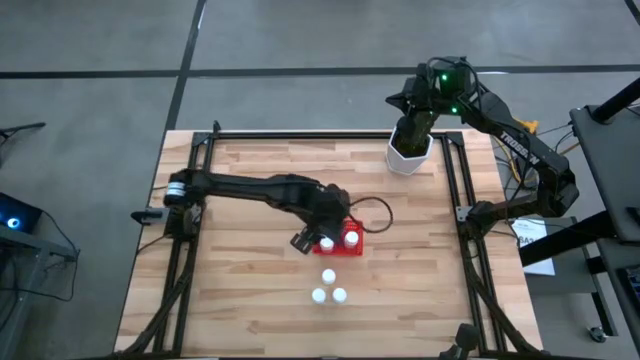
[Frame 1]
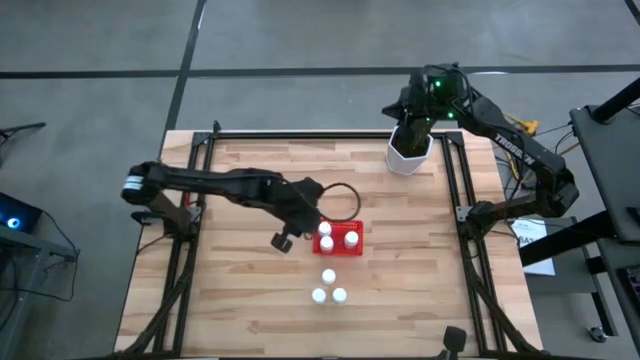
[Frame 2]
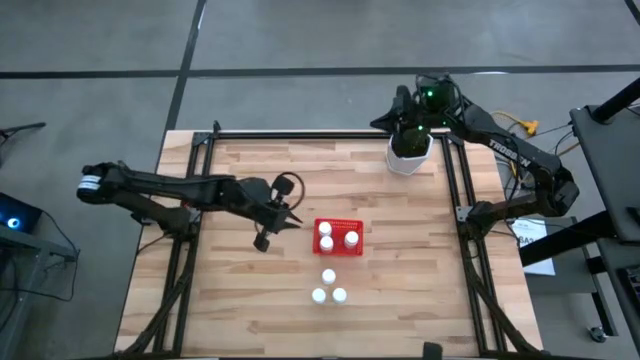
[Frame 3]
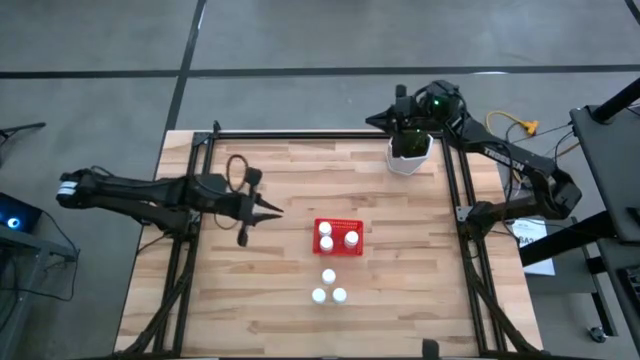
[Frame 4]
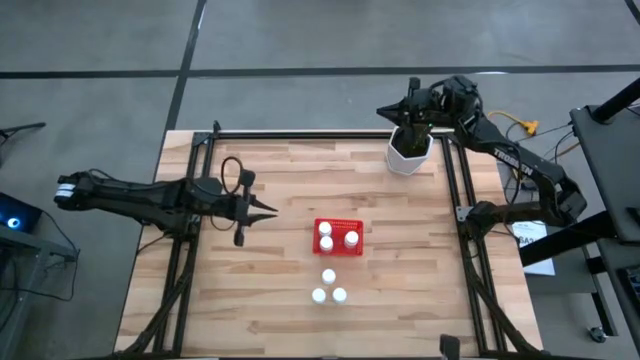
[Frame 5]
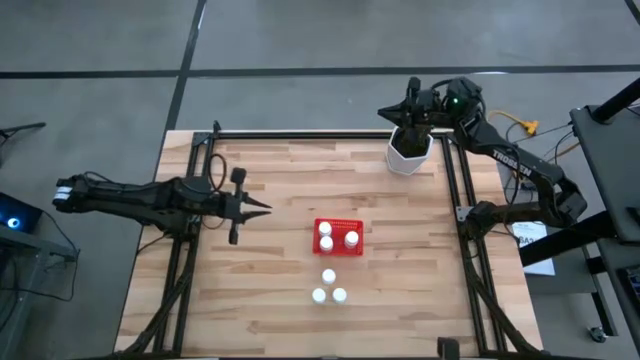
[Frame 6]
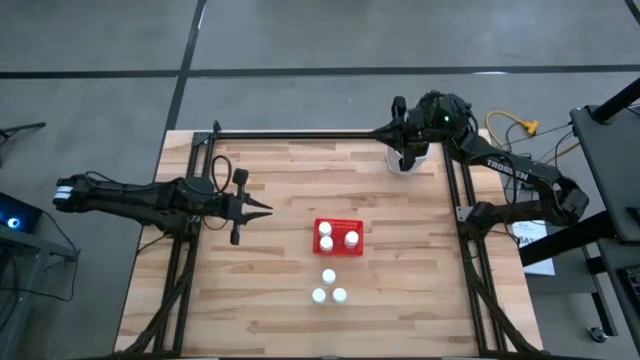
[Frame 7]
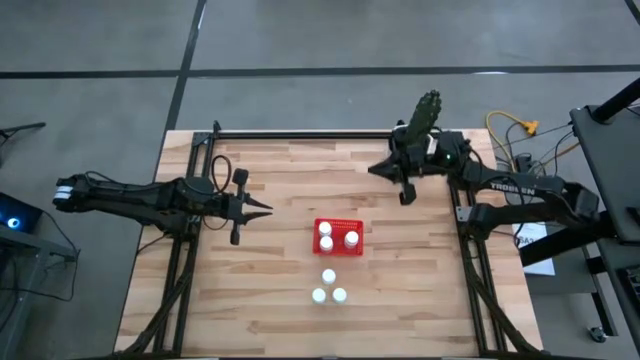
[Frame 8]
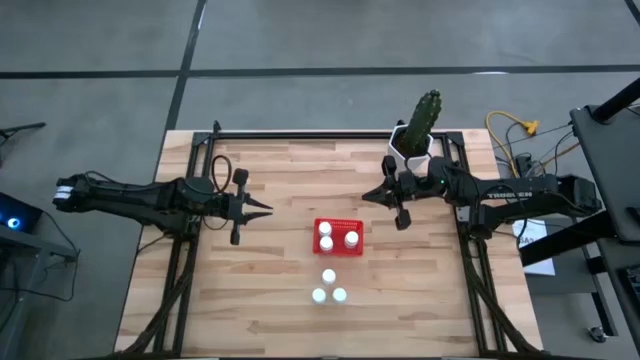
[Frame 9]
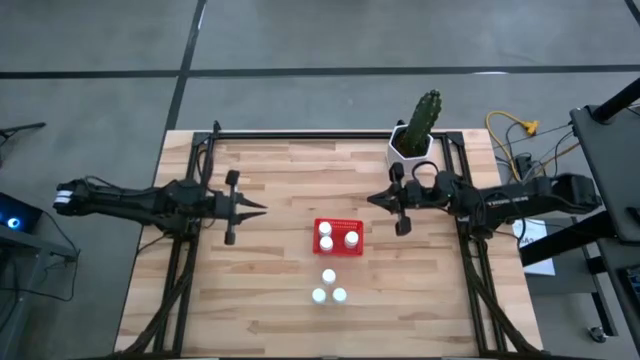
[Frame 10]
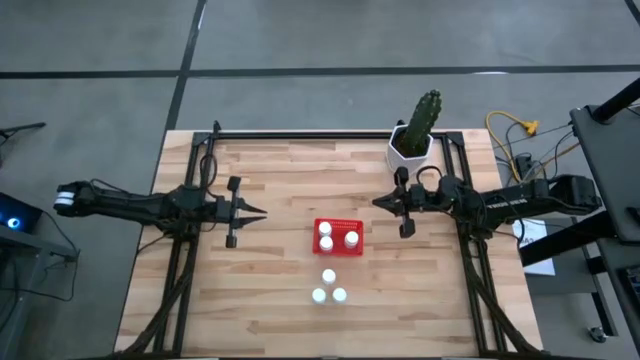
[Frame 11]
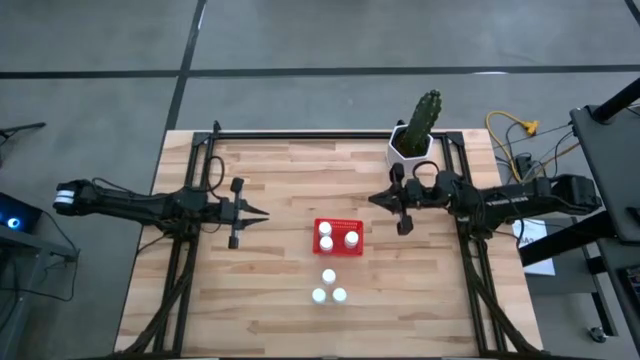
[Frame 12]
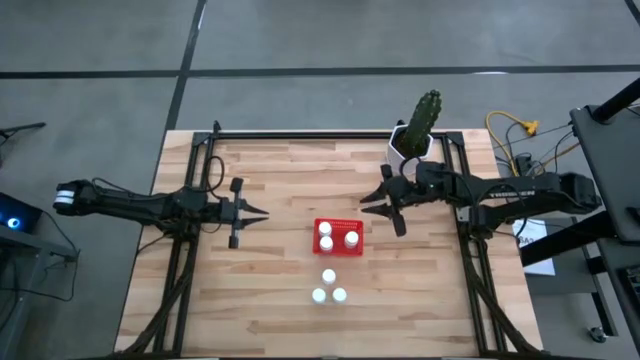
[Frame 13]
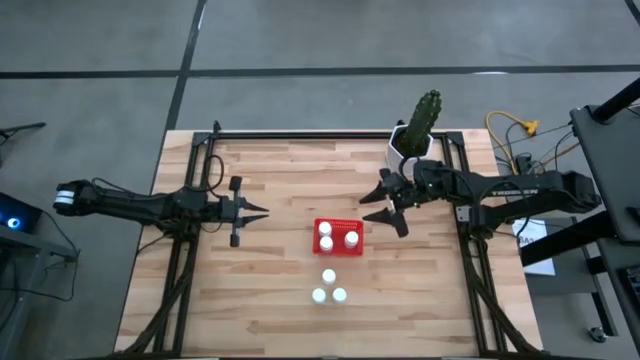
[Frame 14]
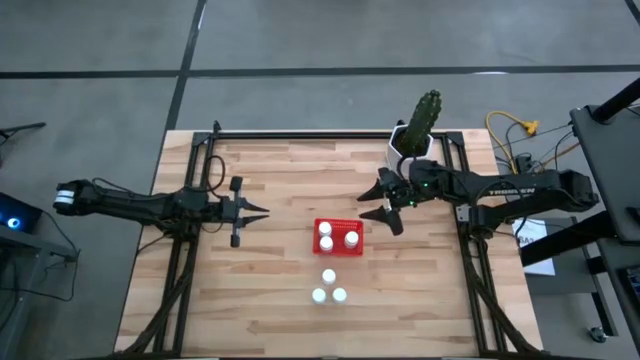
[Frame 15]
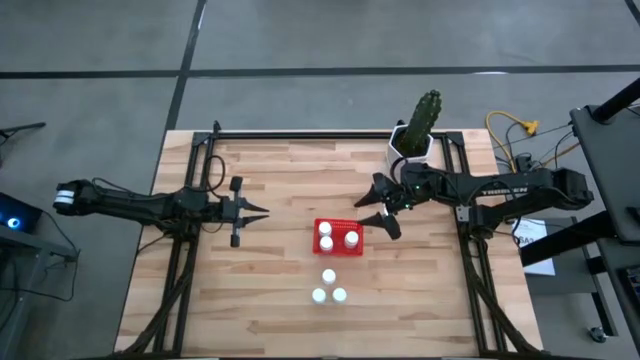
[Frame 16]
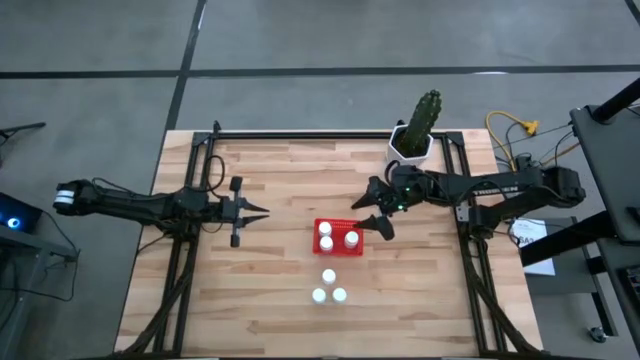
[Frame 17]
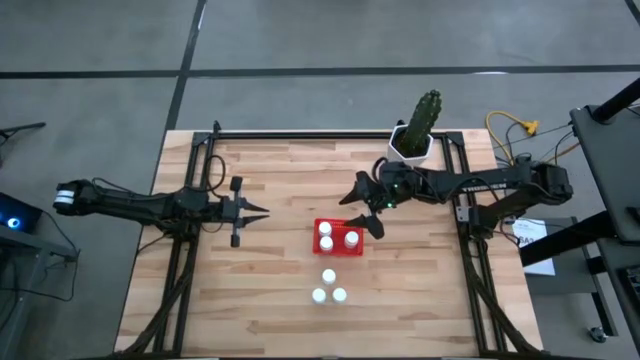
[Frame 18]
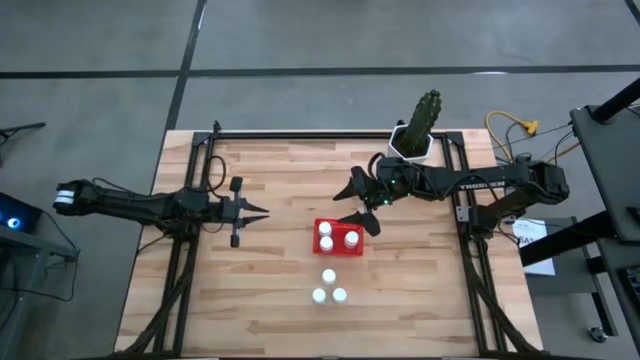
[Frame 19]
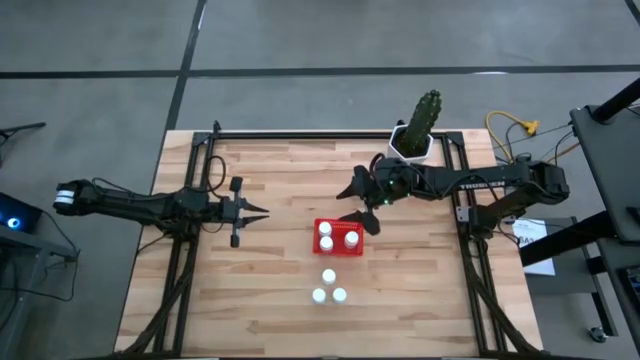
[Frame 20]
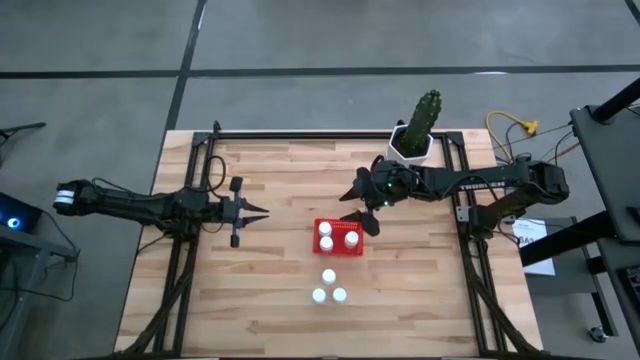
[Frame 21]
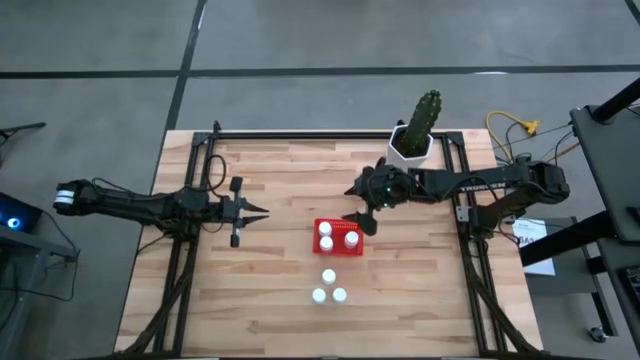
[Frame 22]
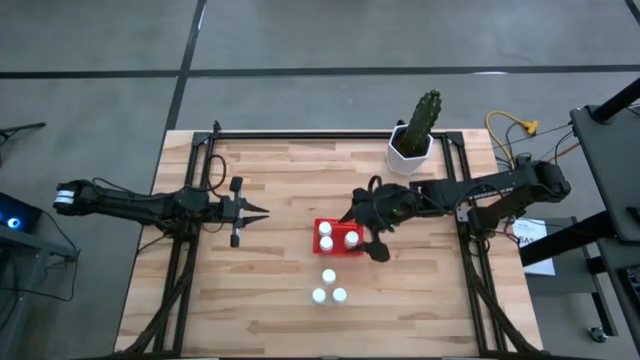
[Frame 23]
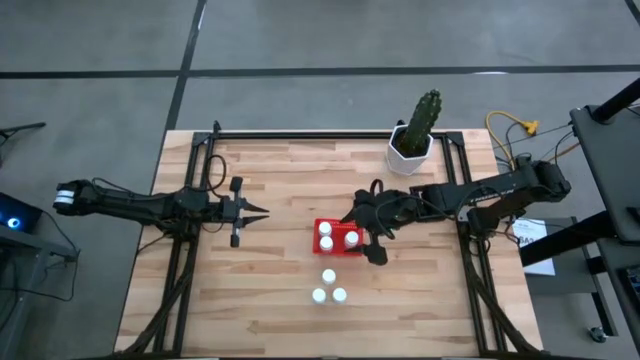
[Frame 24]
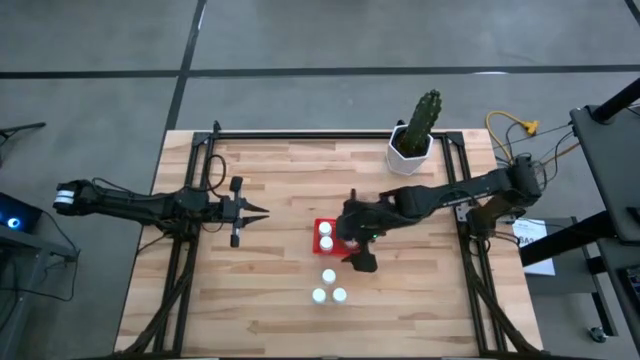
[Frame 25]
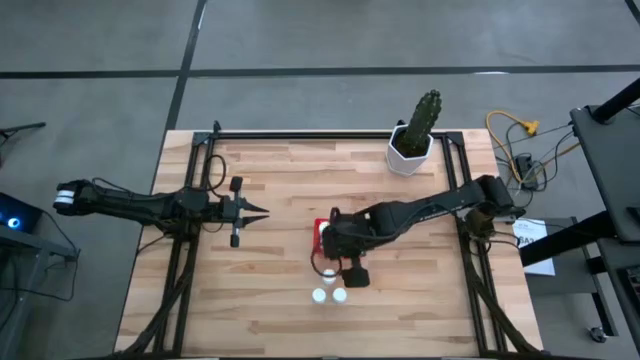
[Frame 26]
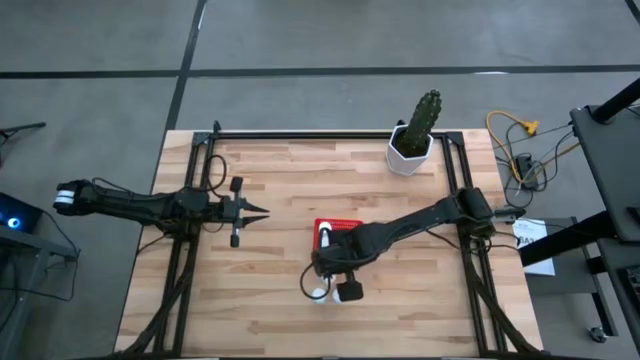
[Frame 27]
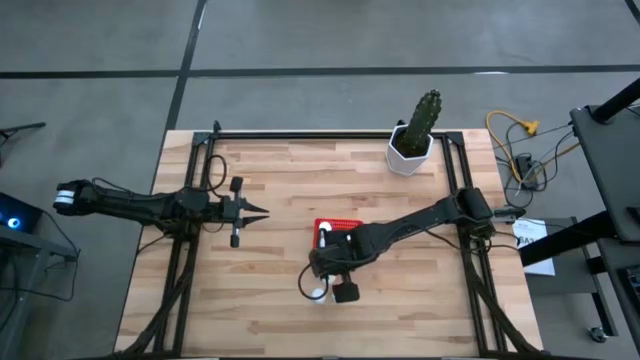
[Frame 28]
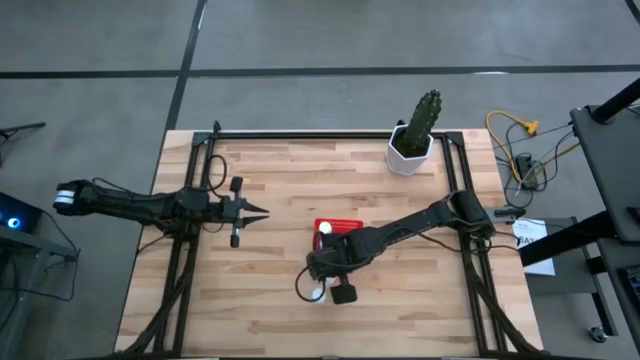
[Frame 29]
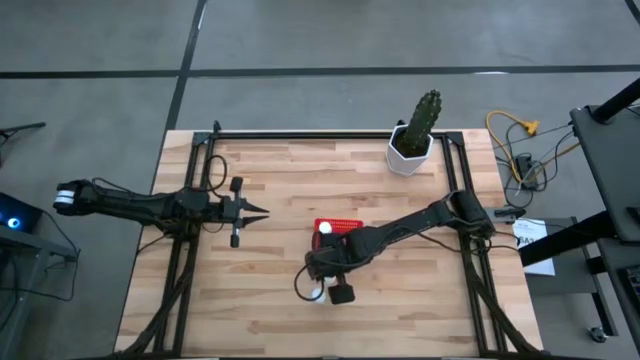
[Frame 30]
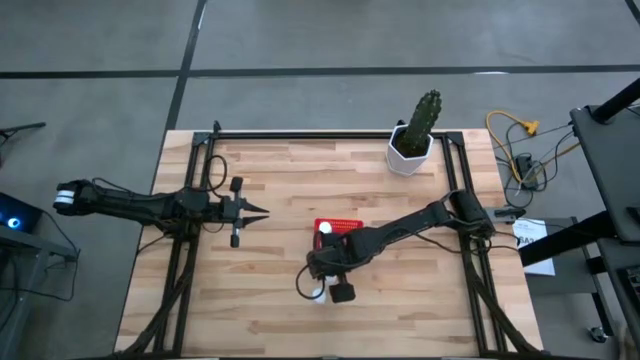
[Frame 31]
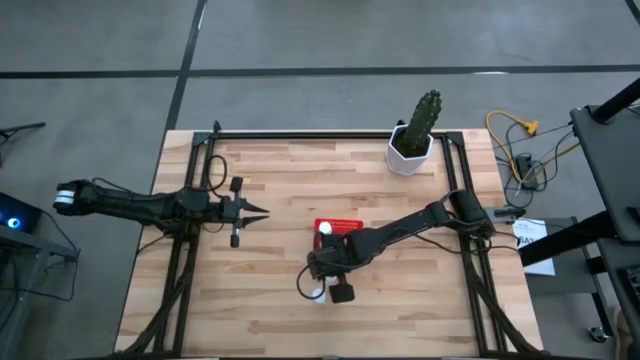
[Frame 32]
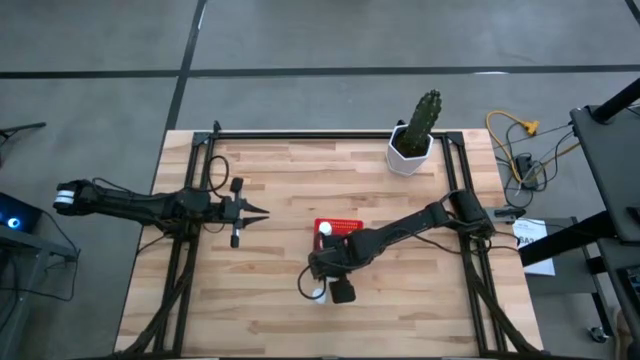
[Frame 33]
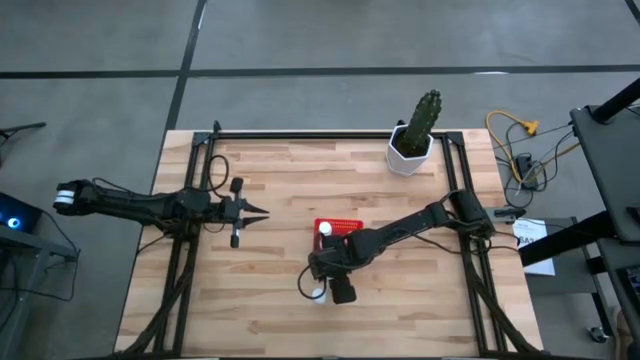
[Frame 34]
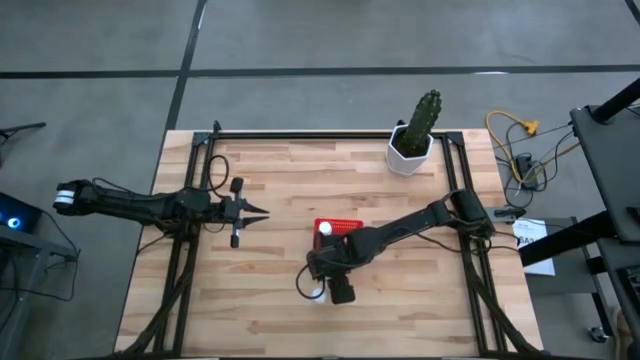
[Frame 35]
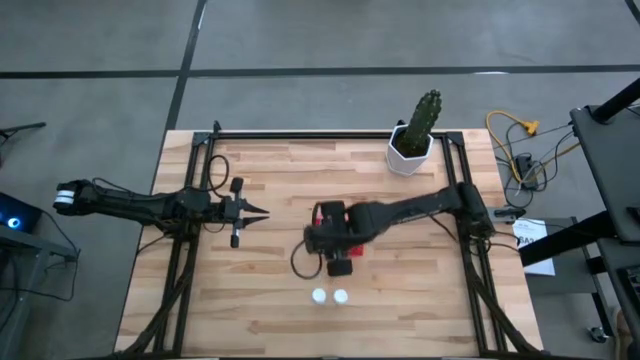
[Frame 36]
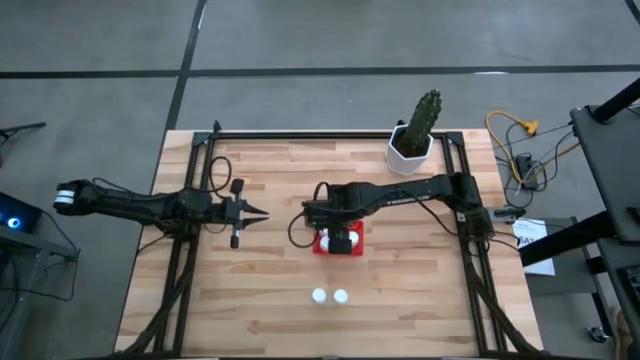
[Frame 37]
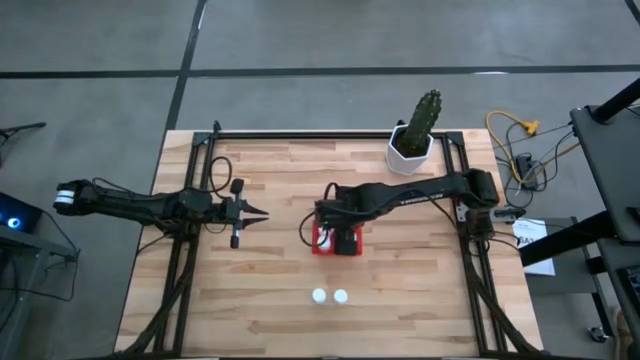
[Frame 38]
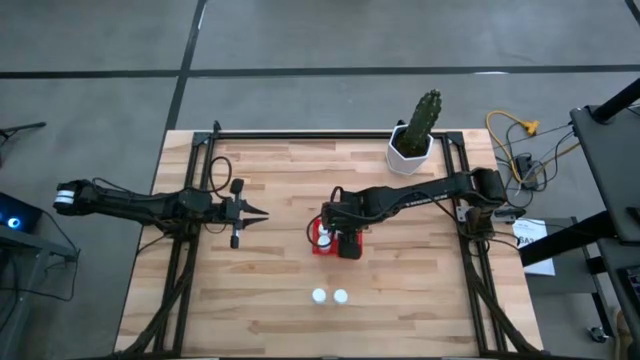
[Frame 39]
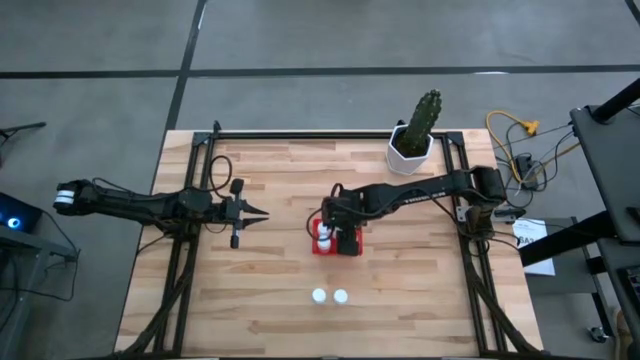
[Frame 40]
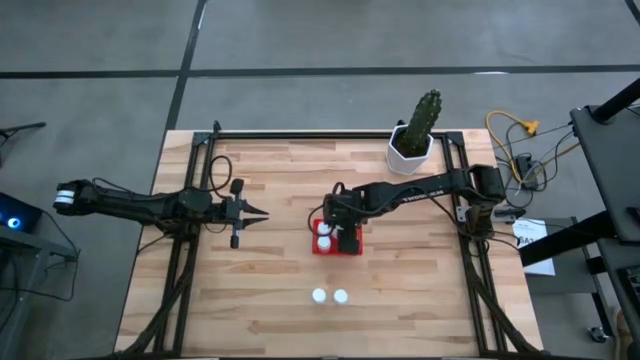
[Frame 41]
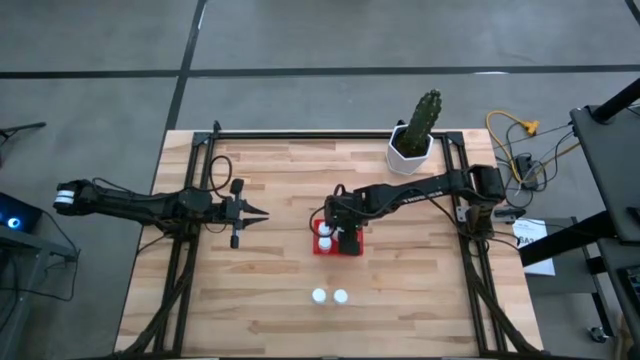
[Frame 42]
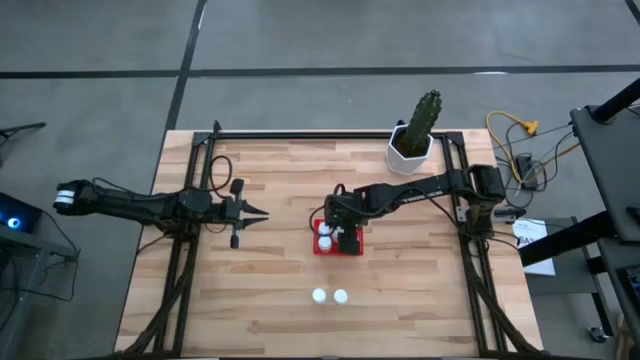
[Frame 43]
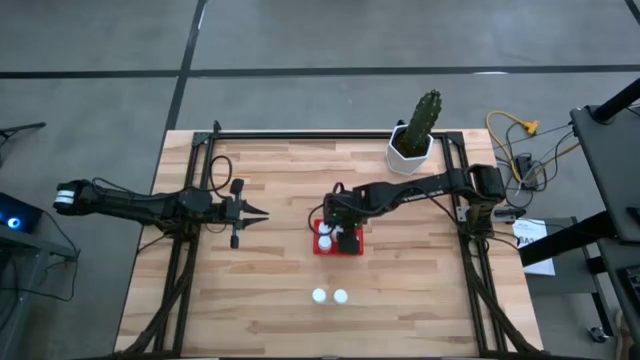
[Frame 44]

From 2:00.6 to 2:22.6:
Task: Pick and place pill bottles into a basket
Put the white pill bottle into the red basket
